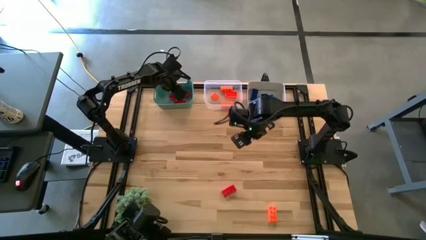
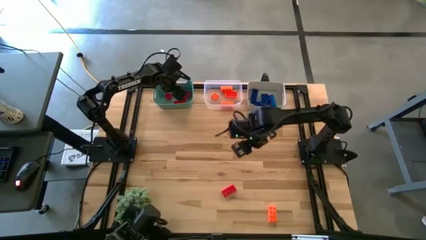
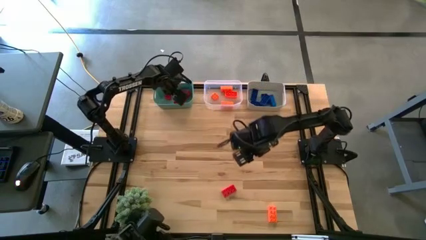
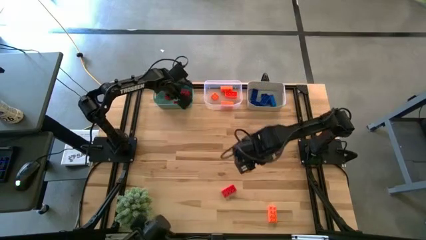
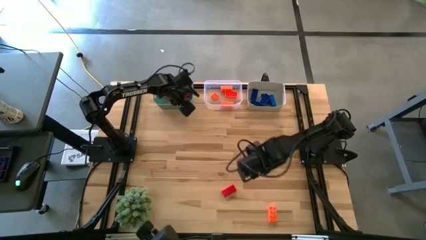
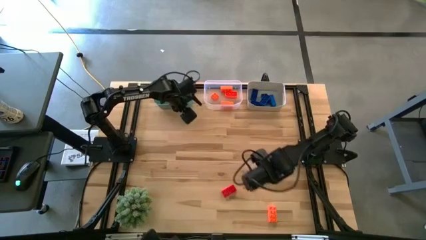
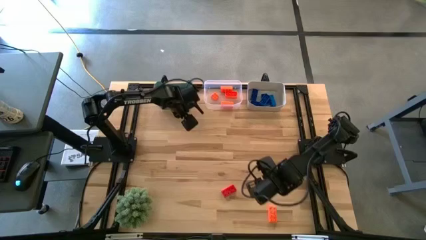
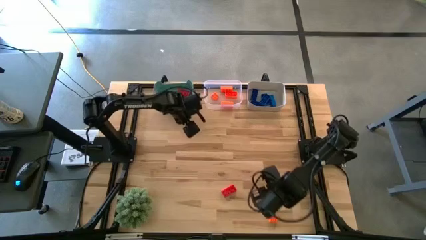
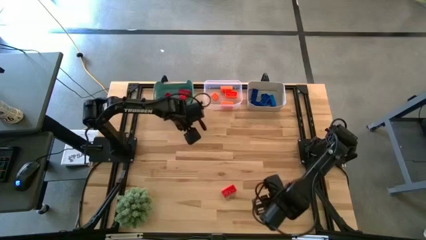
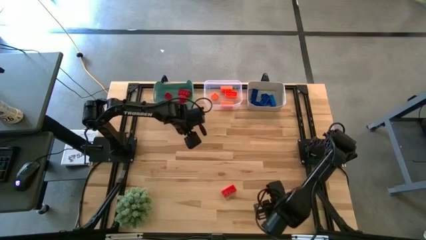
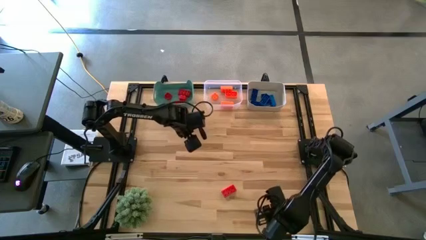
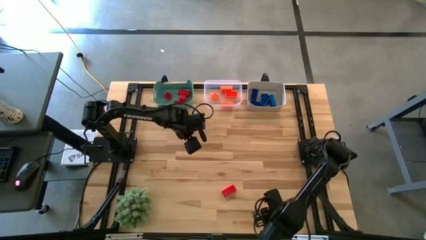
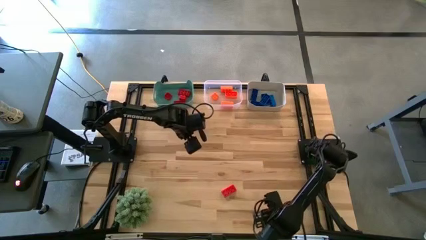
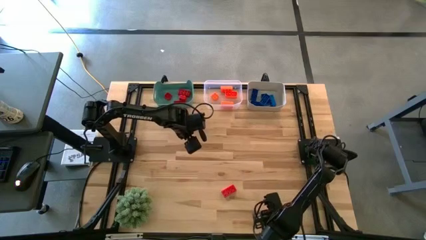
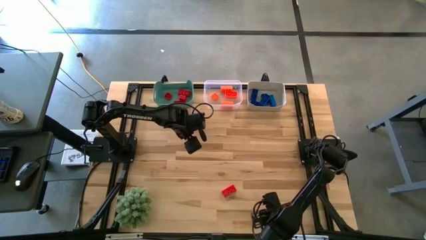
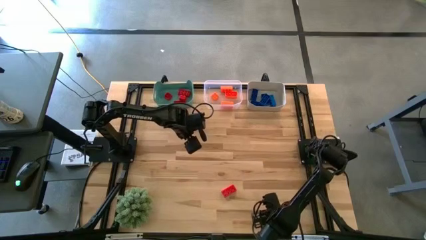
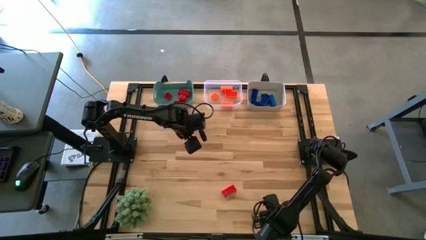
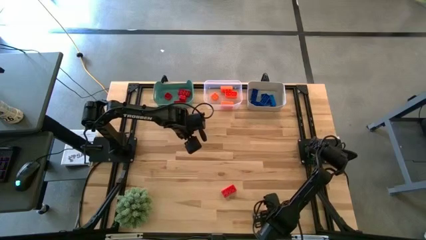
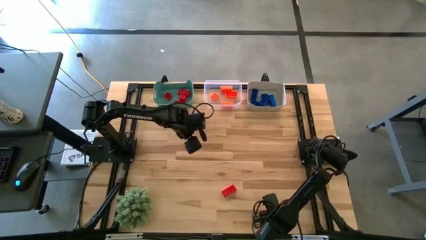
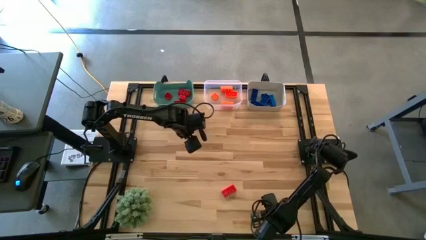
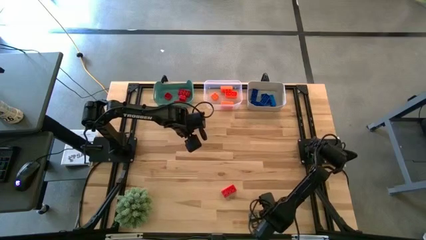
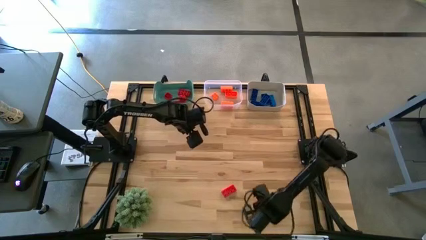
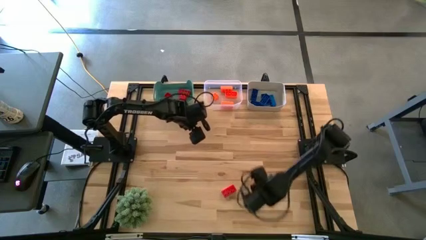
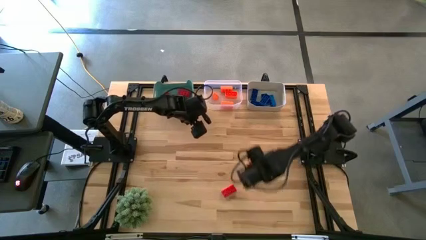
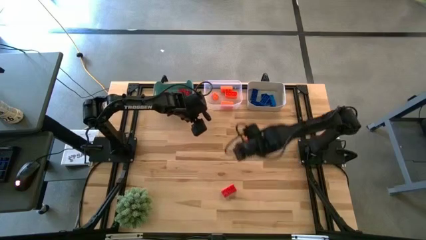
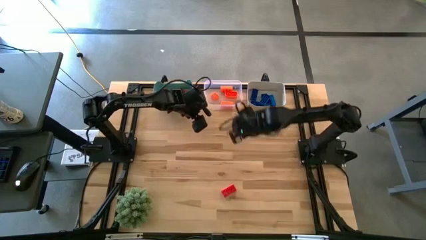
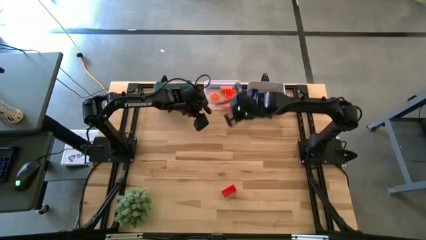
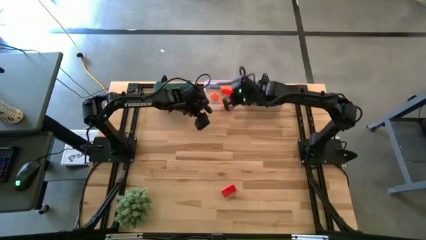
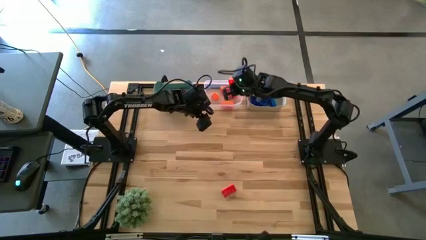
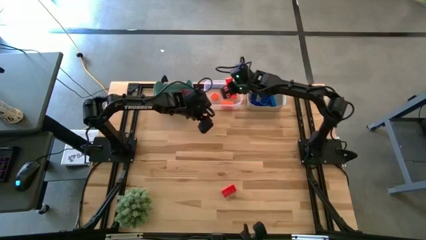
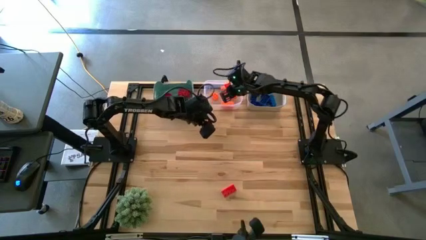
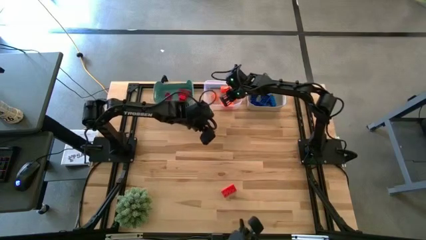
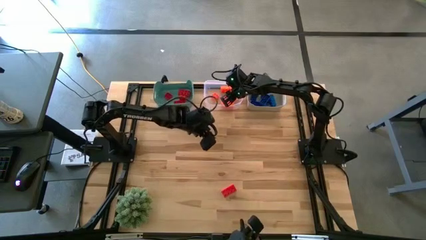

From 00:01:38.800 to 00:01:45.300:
Task: Sort & place blocks by color
Put the orange game piece into the transparent bin

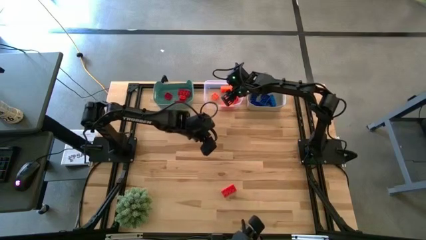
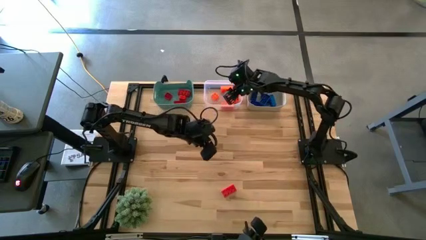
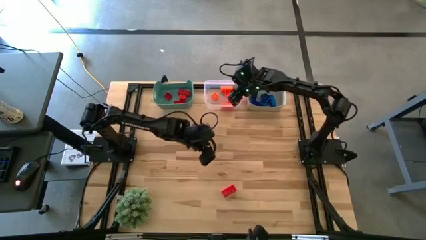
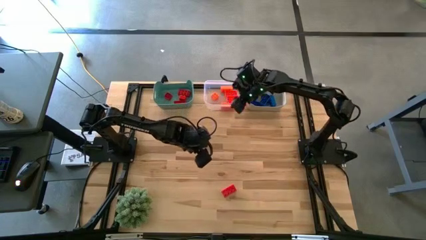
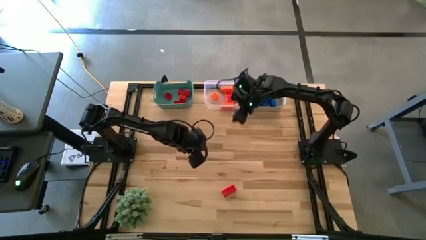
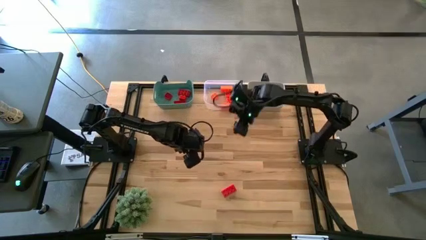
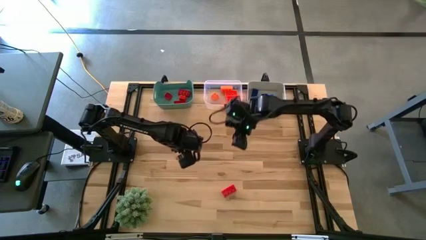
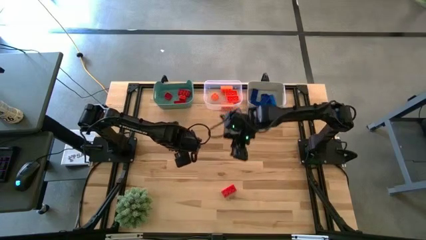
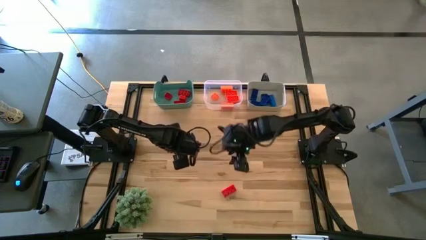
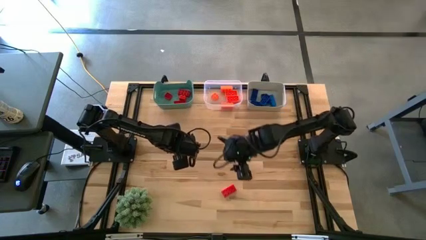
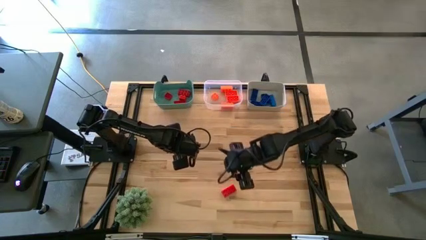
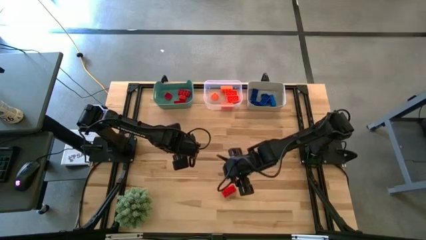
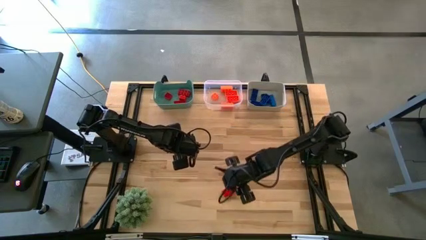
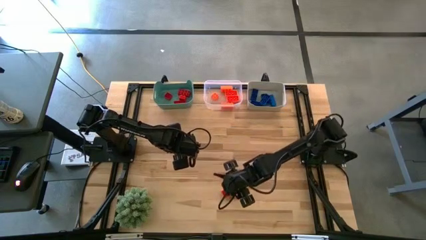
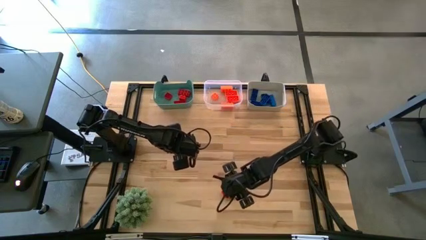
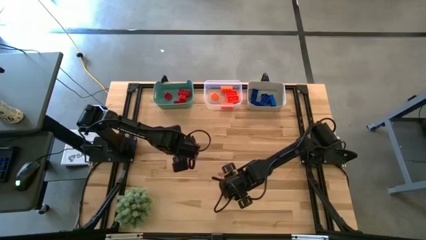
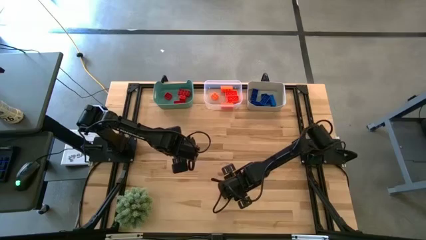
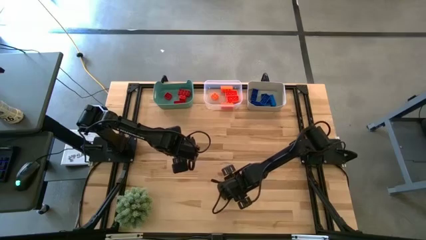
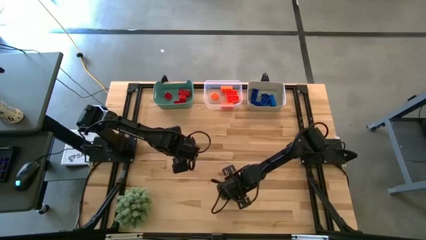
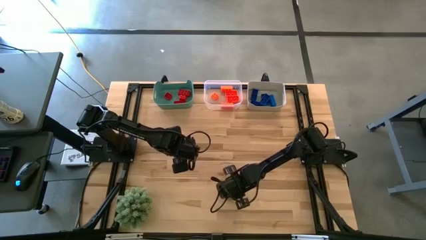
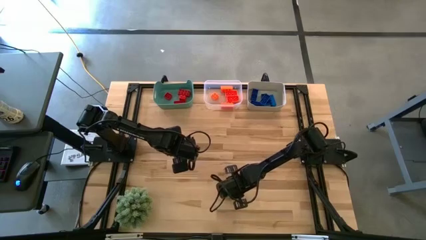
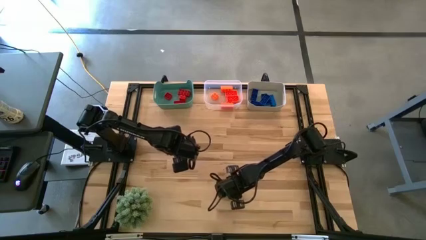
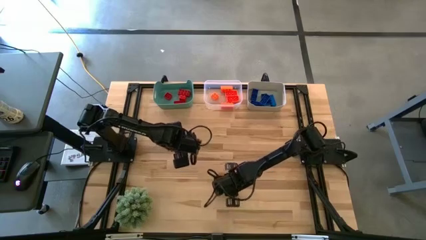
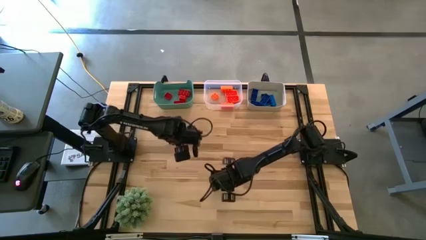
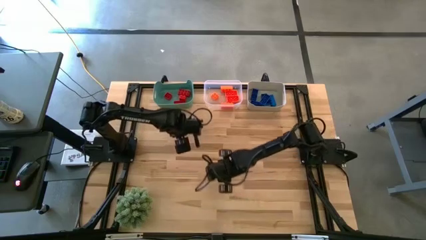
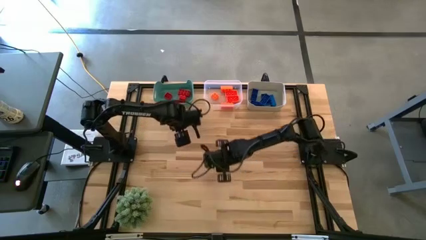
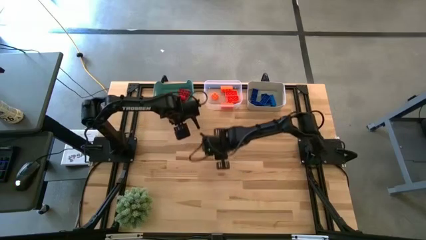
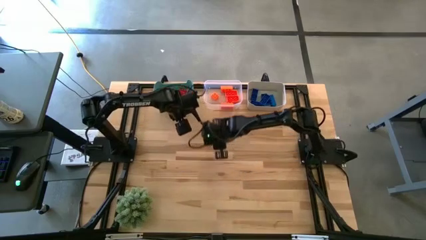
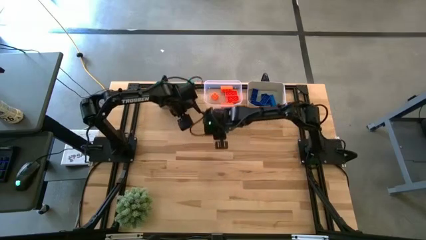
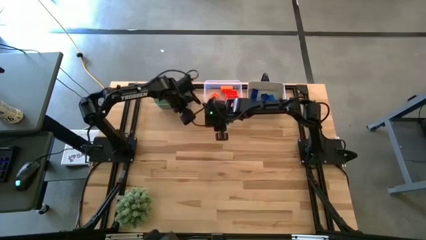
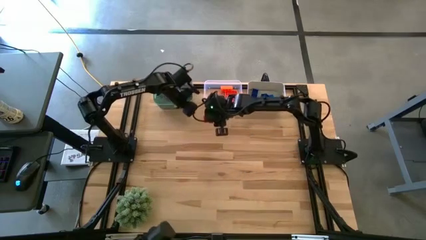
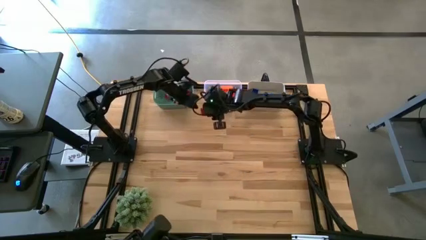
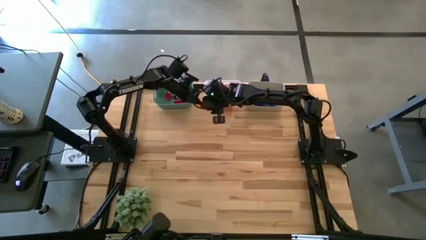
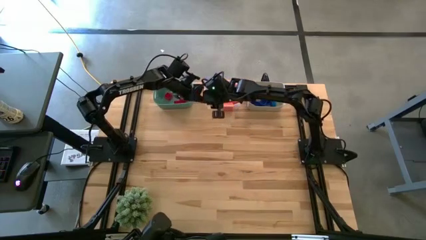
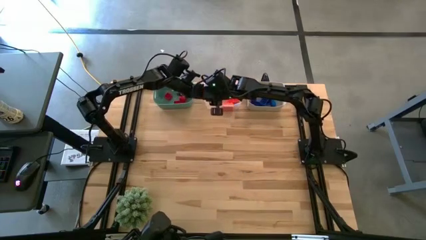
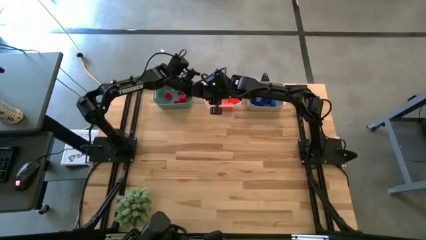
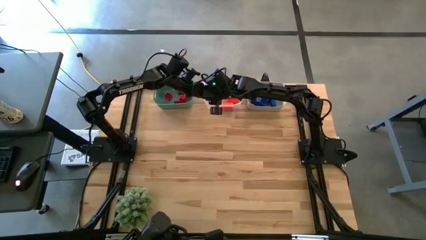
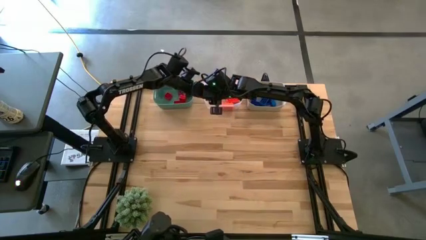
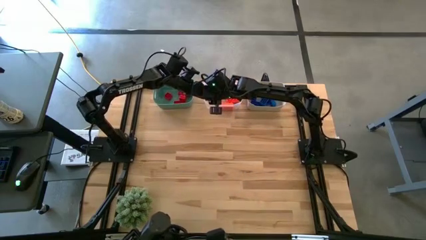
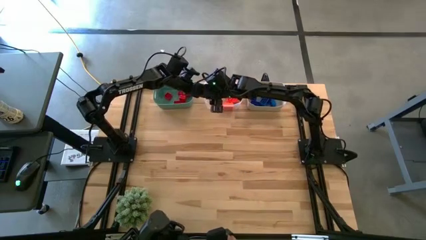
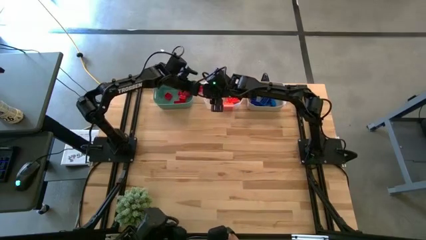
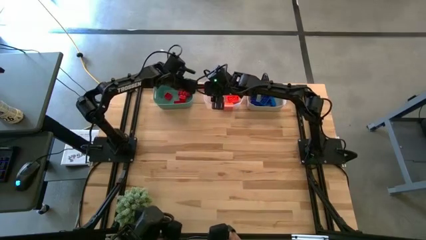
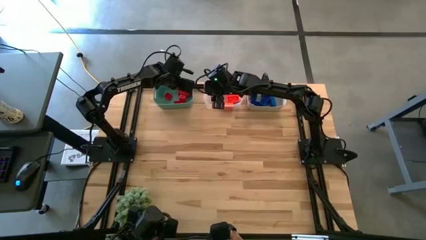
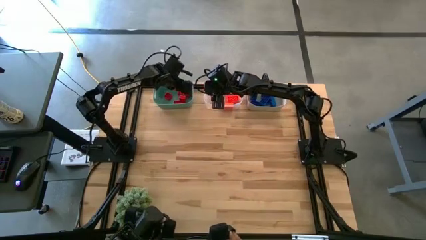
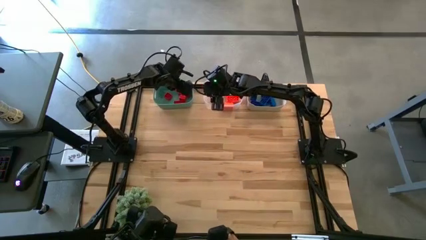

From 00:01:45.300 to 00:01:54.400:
Put the red game piece into the blue bin

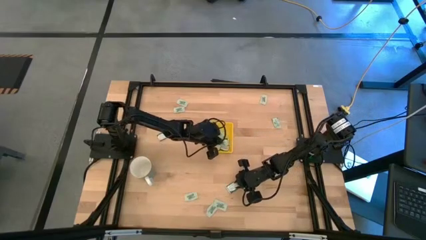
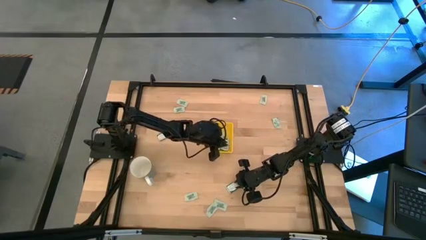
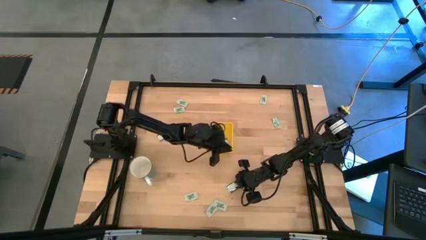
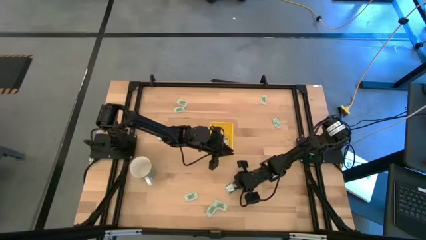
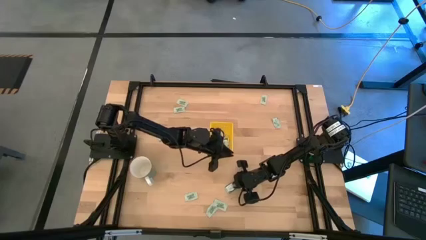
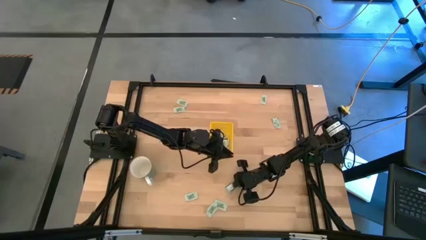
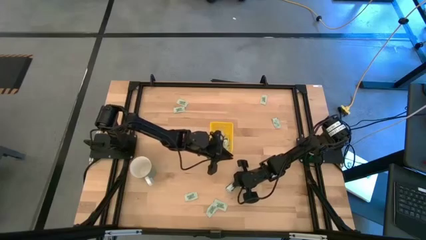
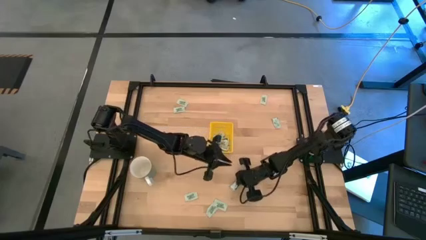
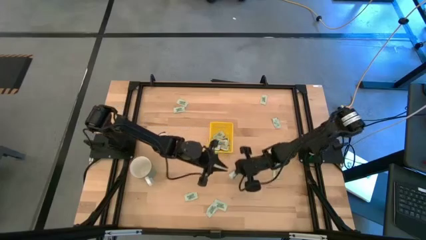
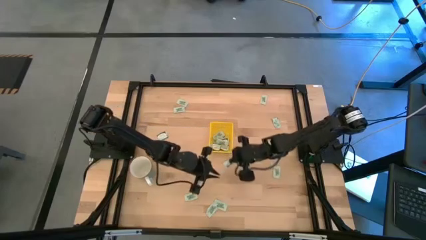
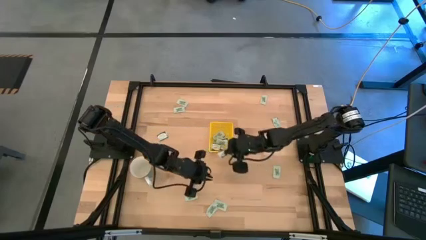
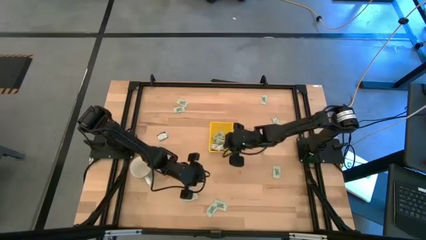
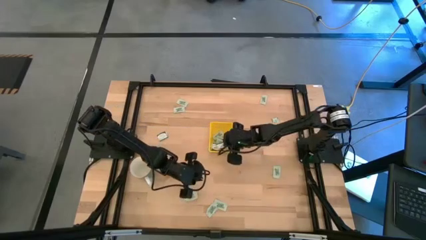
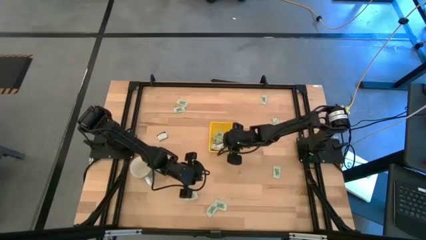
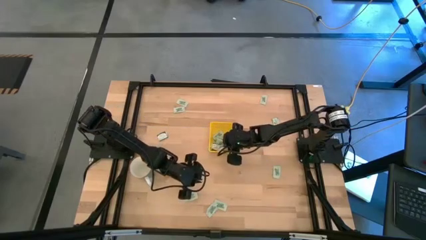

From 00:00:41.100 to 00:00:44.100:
Task: Pick and place Stevia / Truvia into bins
Put the bottom green stevia packet into the yellow bin
